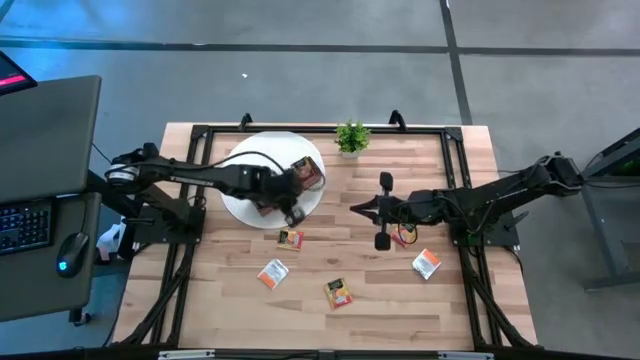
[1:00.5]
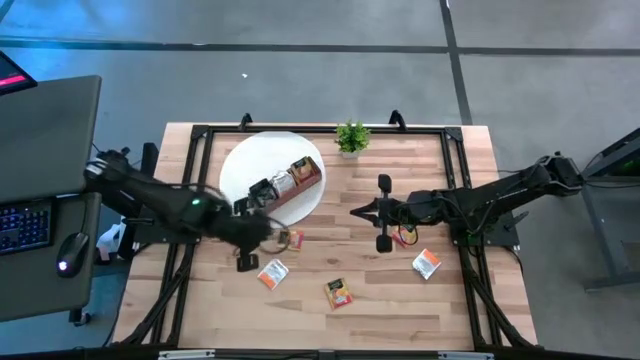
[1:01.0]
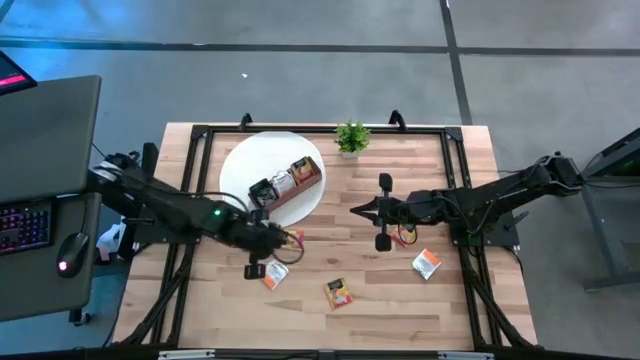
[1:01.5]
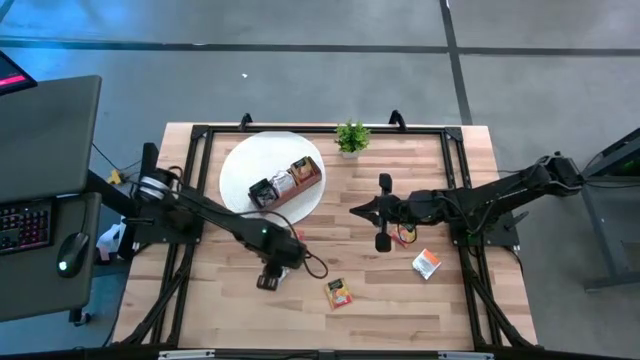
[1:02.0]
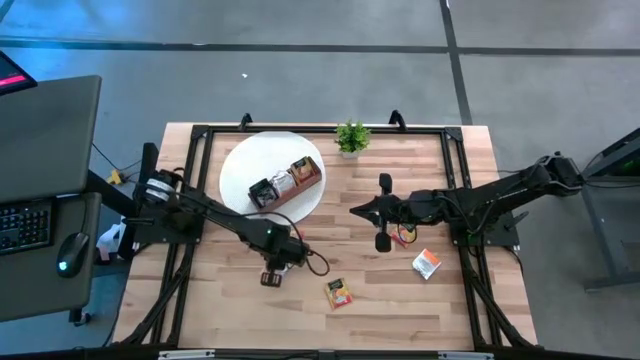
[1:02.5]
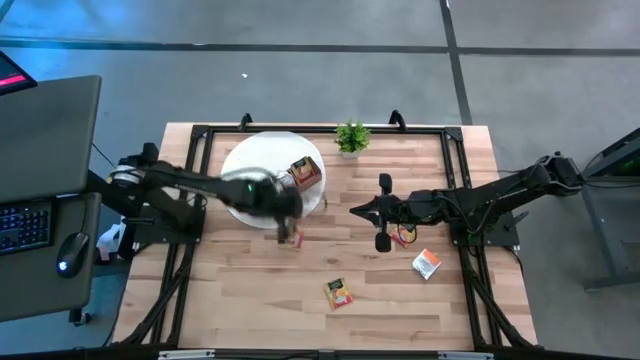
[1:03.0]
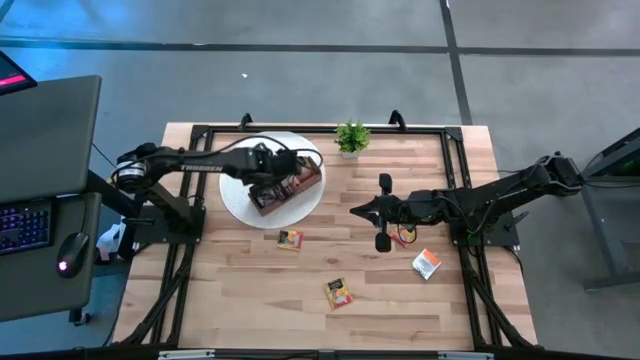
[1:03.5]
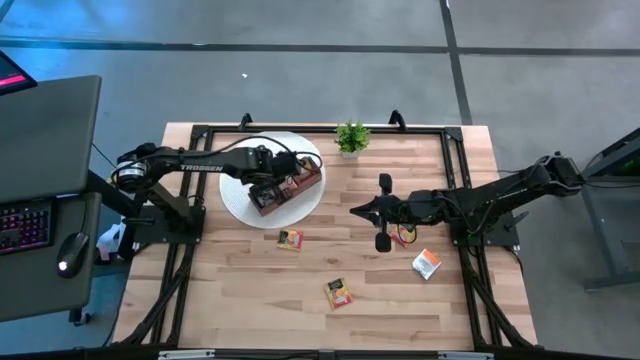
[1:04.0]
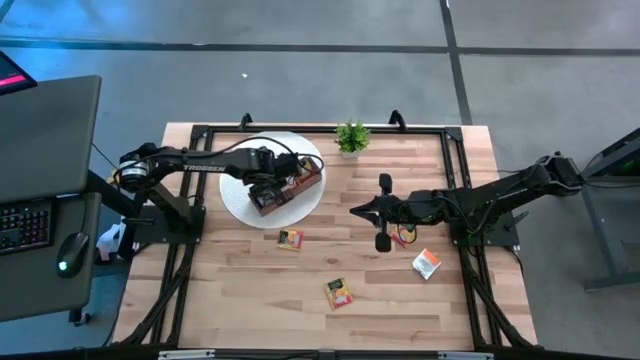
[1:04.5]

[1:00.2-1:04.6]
Task: Pick & Place Tea
Put the white tea bag into the middle section of the wooden organizer

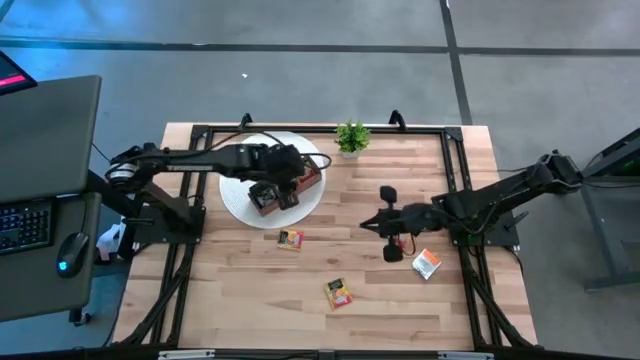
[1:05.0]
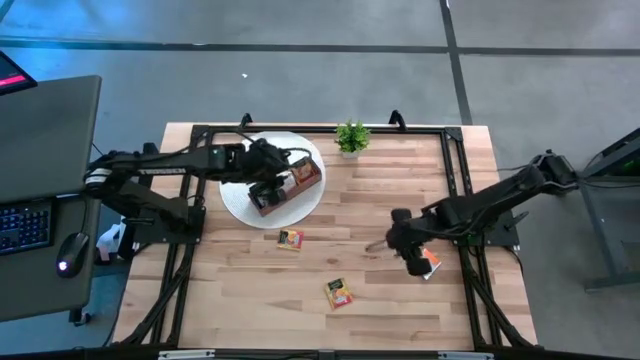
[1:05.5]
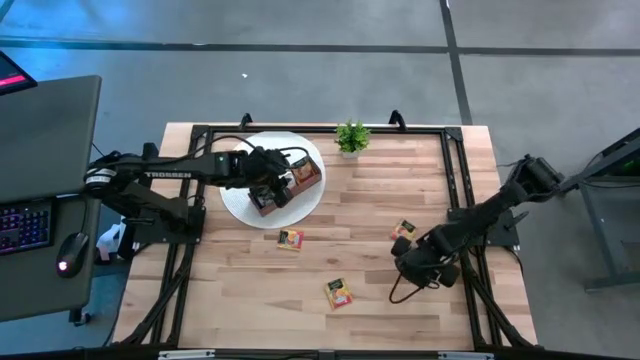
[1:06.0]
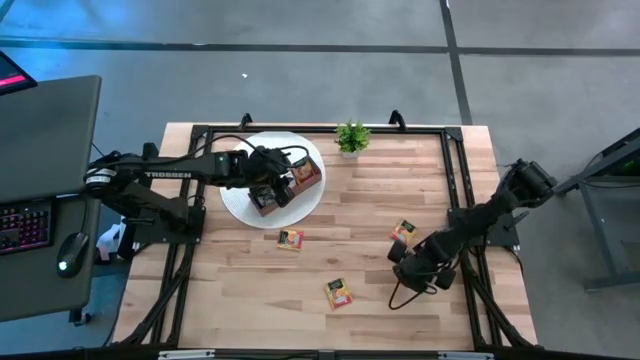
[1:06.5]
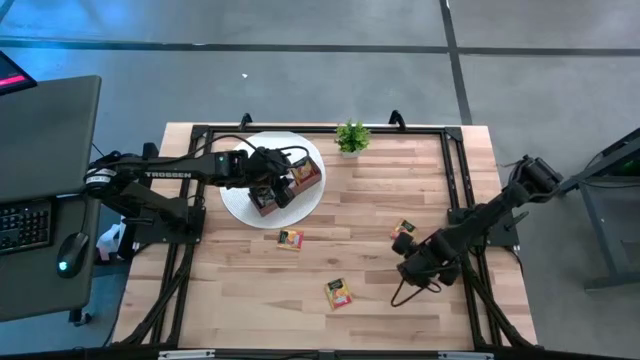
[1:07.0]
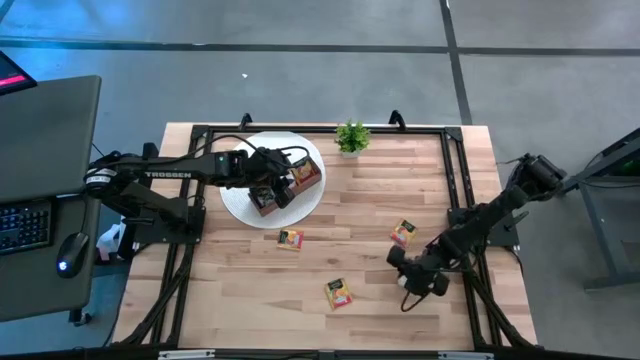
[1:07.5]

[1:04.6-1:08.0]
Put the white tea bag into the middle section of the wooden organizer

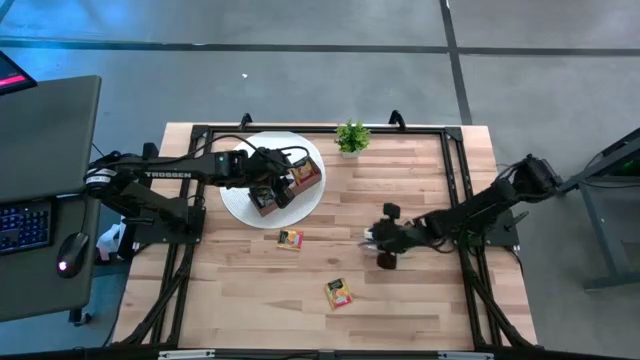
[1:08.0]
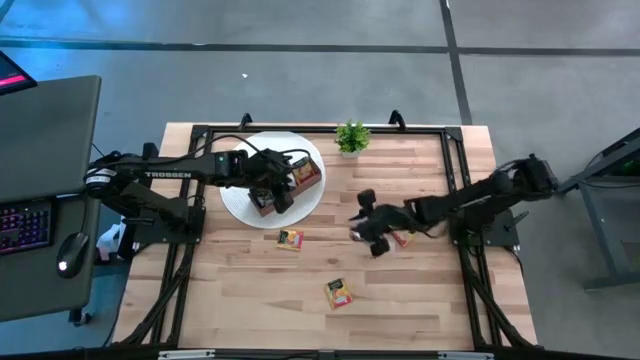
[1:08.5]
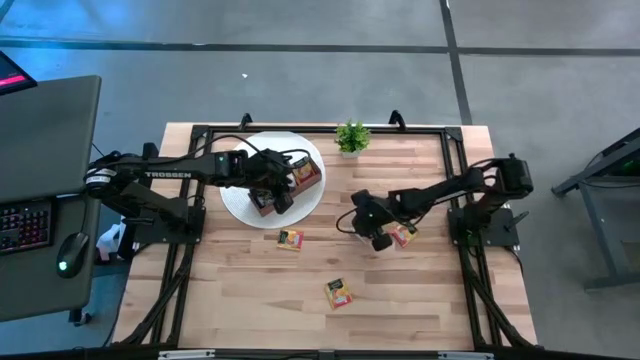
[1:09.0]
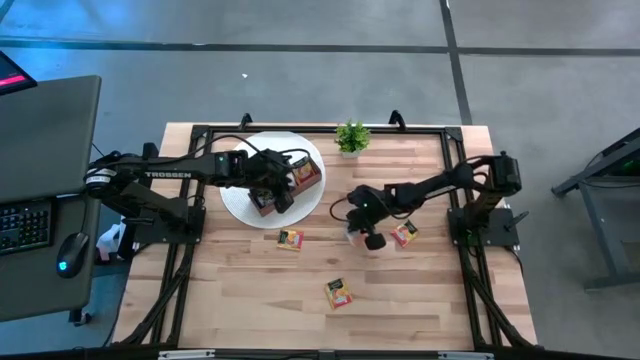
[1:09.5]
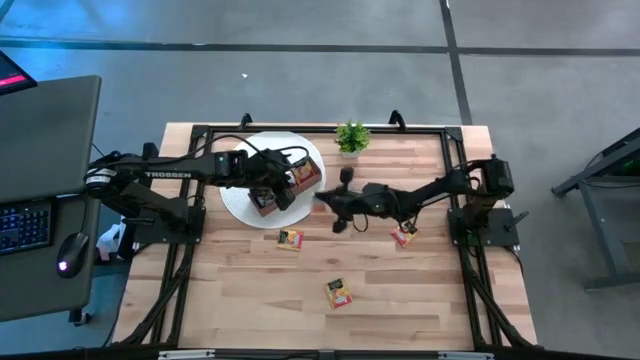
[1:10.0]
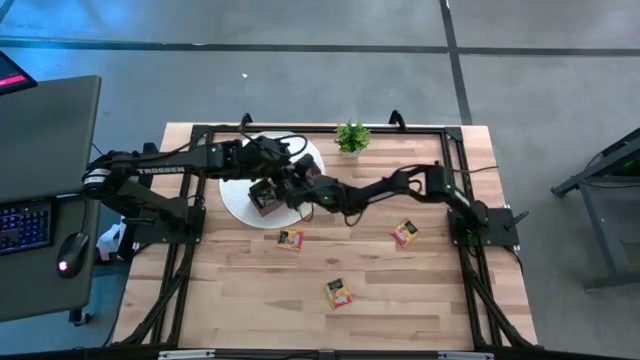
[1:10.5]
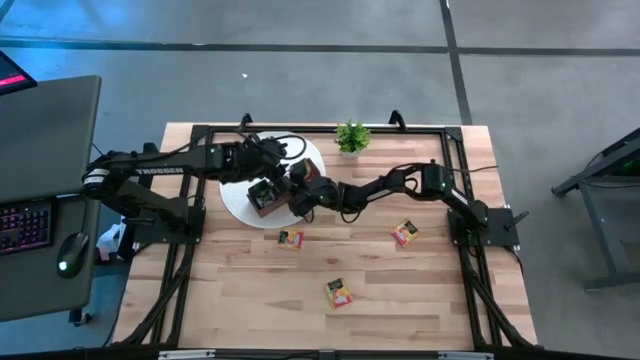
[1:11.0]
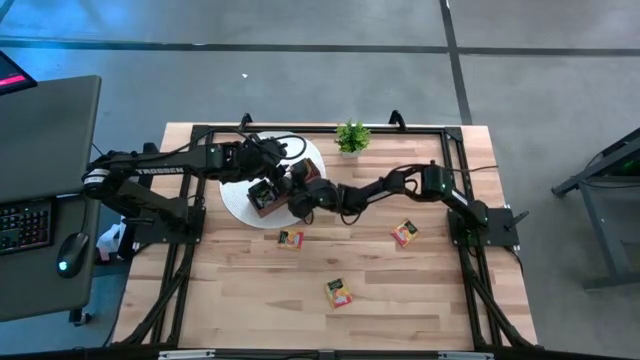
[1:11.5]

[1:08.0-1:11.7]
Put the white tea bag into the middle section of the wooden organizer

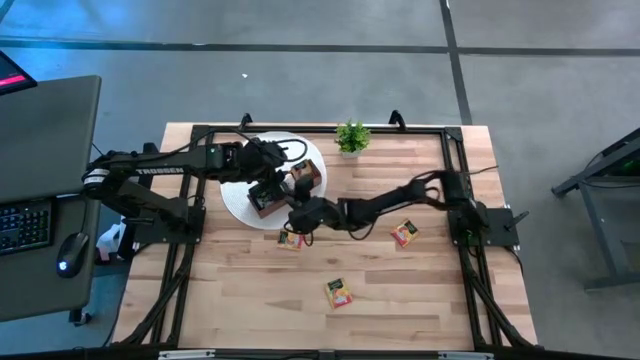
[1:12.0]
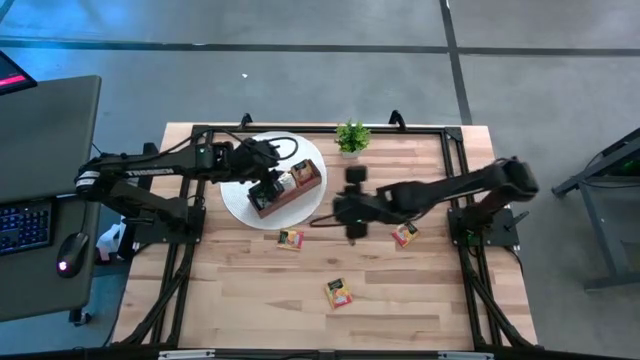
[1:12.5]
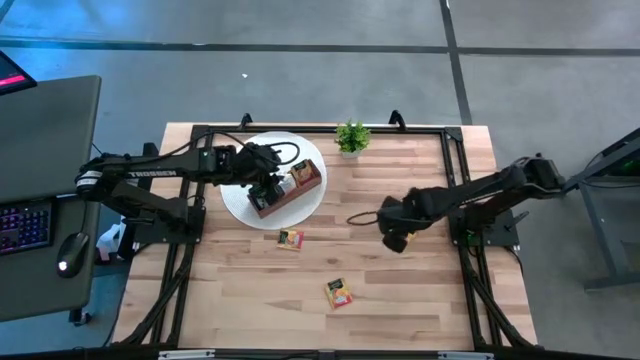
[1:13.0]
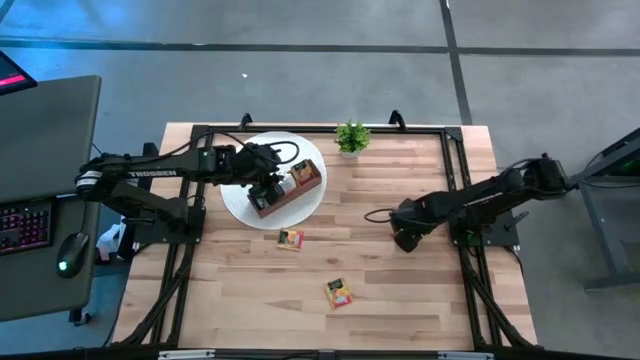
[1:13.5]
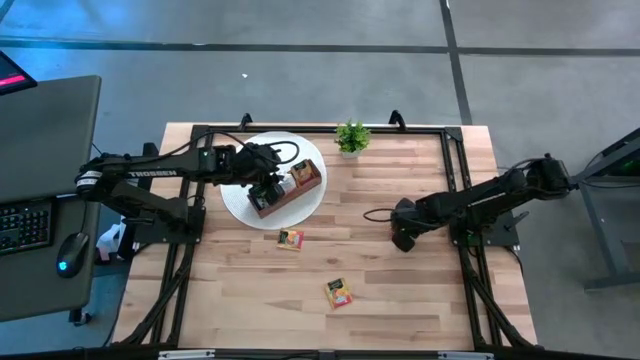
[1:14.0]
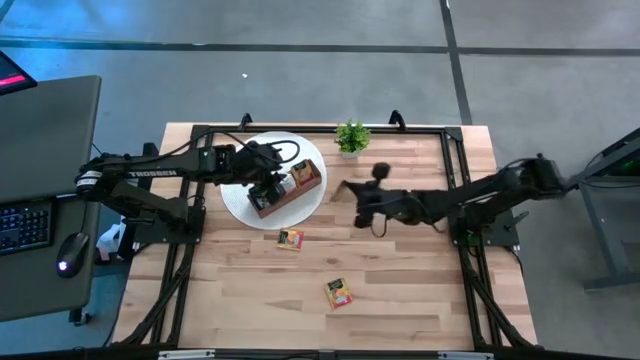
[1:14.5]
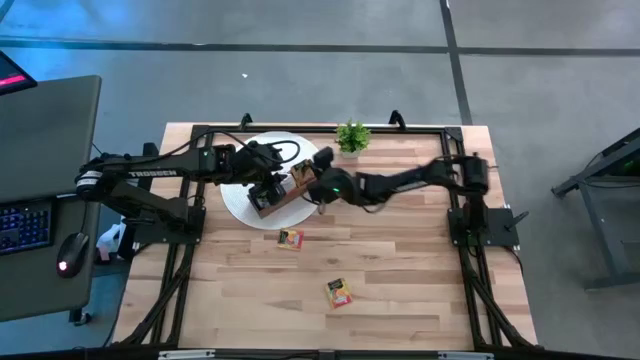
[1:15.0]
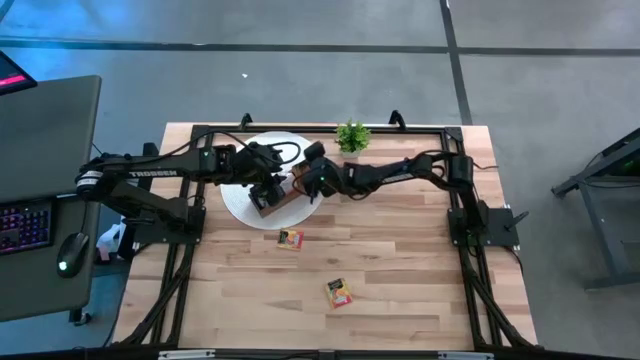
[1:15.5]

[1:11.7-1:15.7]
Put the orange tea bag into the right section of the wooden organizer

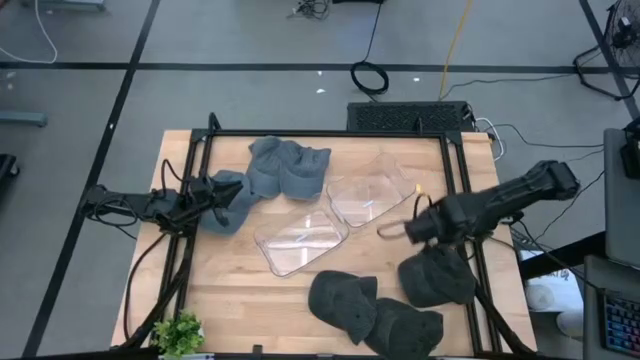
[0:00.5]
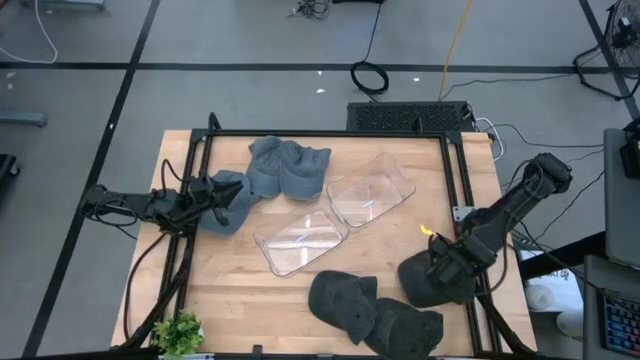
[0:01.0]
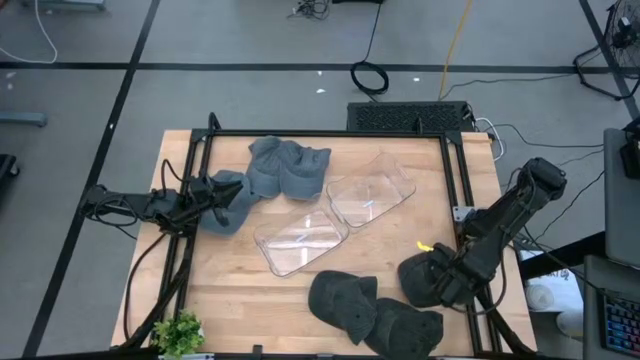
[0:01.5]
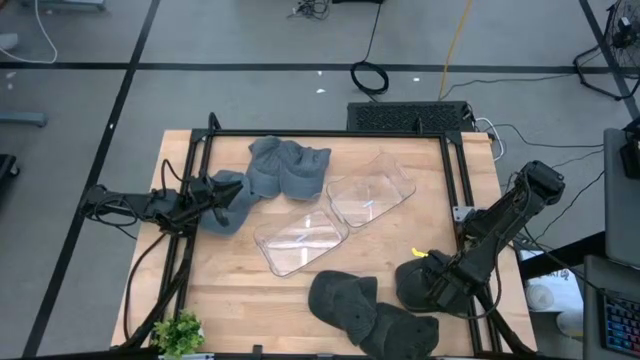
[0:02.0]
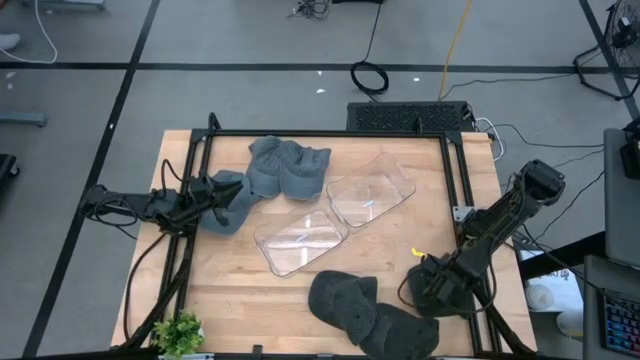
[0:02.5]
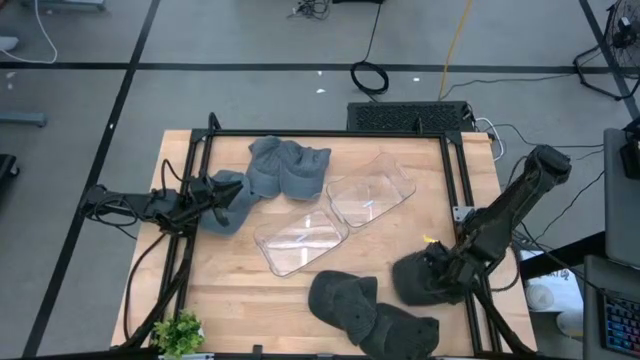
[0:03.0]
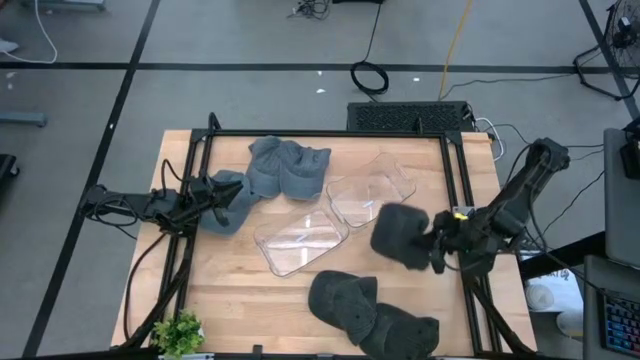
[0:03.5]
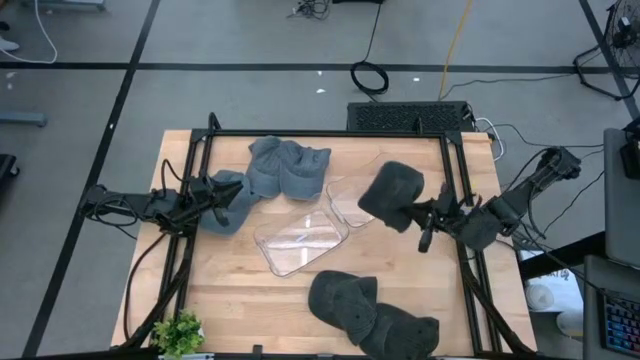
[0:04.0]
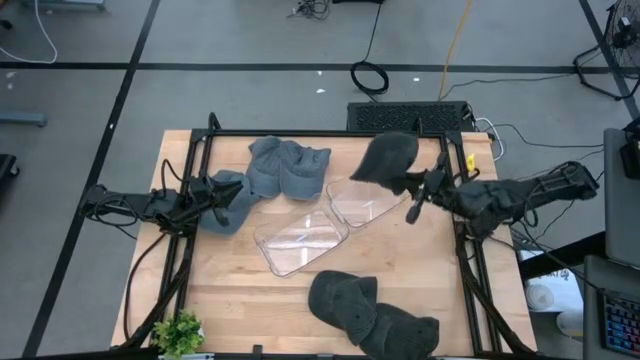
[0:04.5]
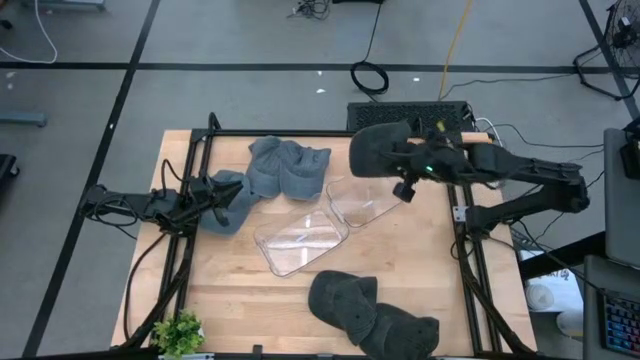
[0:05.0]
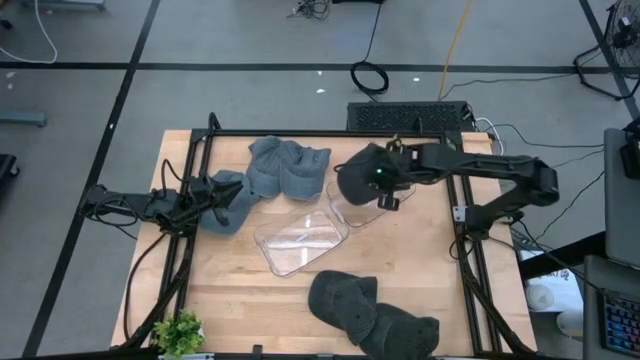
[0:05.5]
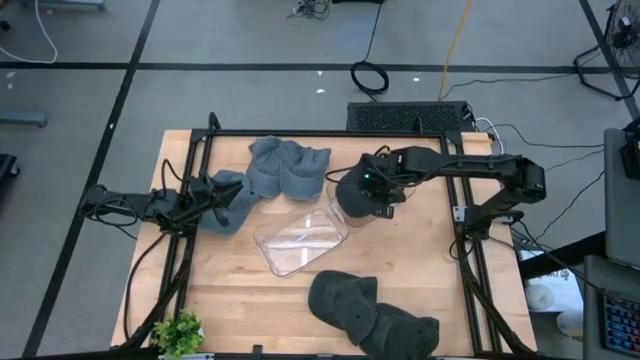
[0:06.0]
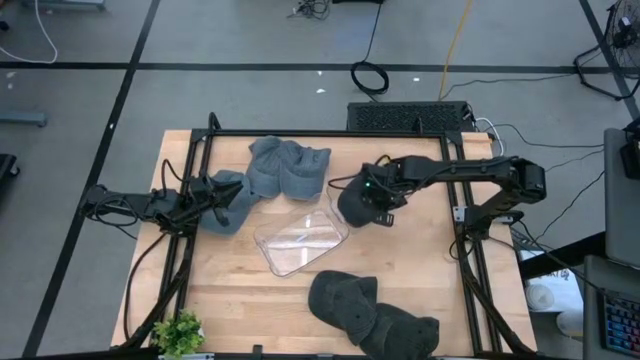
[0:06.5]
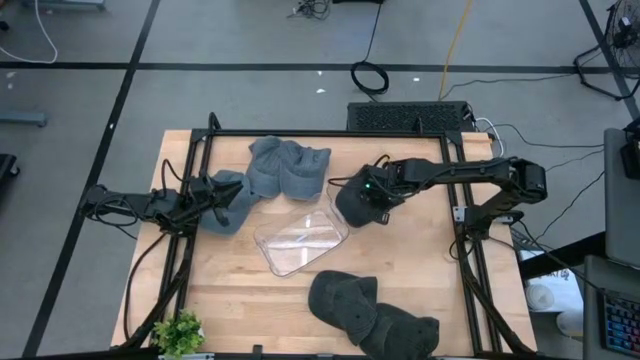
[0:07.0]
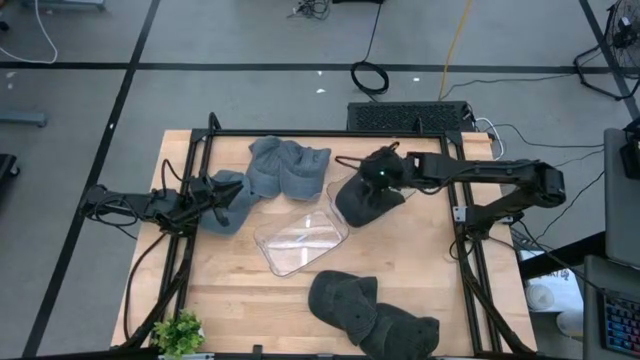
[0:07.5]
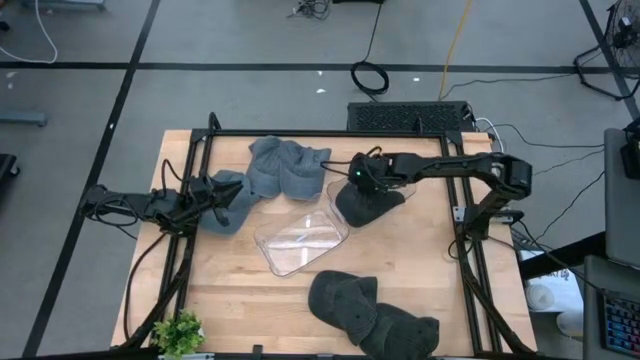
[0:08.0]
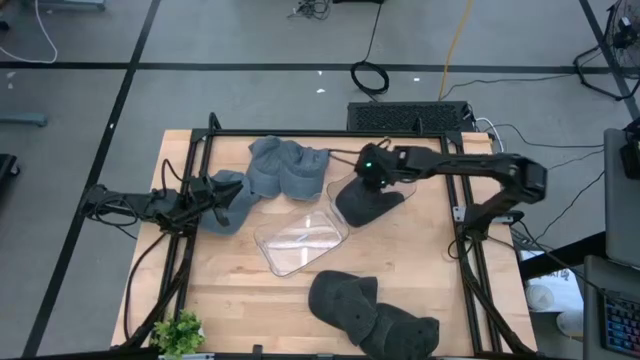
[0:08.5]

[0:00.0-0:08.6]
Task: Pick & Place hat
Put the top right black cap into the top transparent bin
